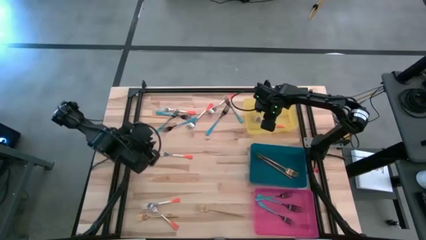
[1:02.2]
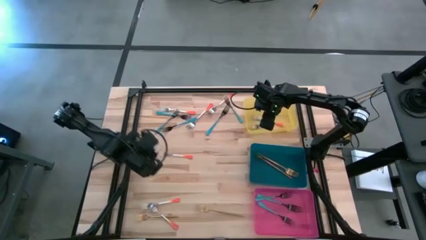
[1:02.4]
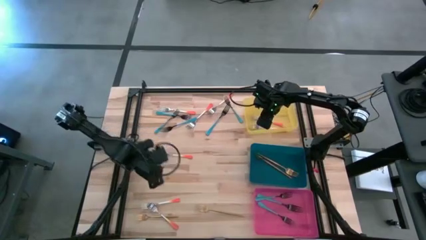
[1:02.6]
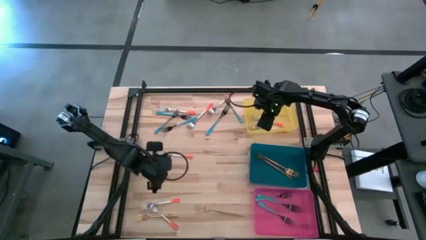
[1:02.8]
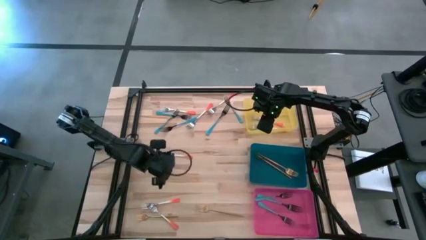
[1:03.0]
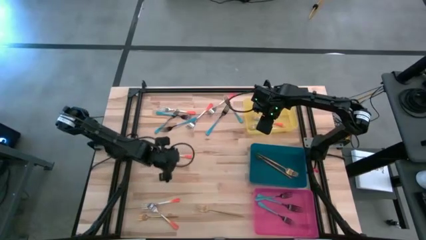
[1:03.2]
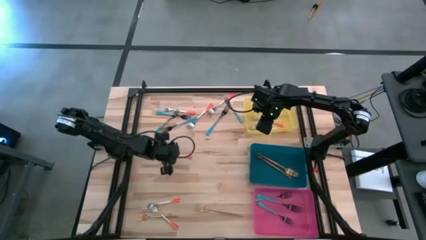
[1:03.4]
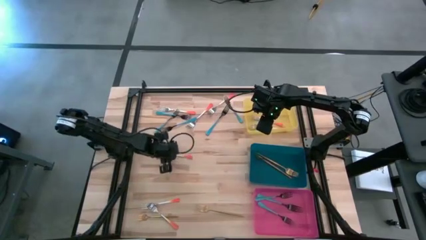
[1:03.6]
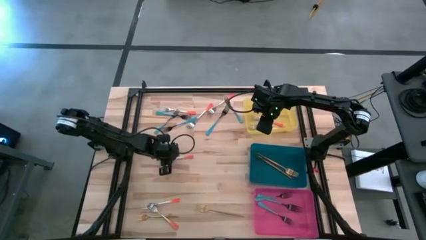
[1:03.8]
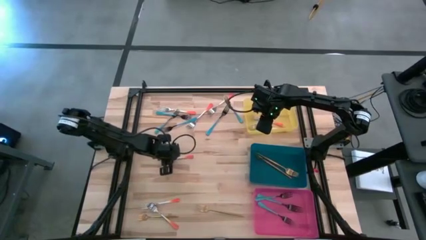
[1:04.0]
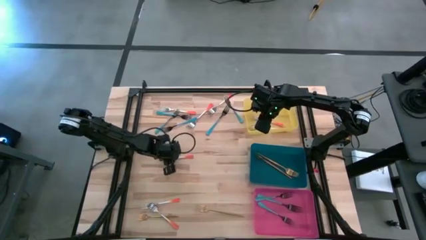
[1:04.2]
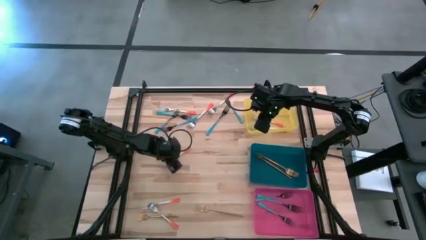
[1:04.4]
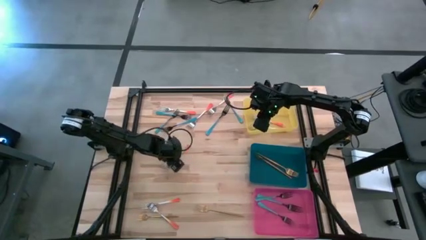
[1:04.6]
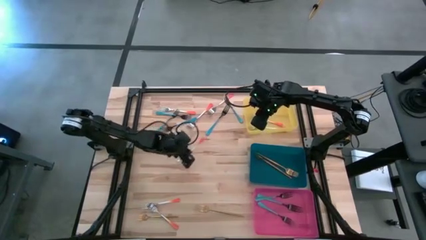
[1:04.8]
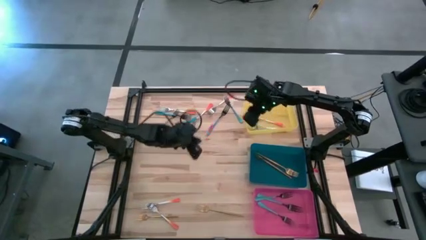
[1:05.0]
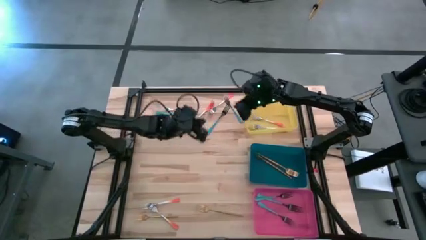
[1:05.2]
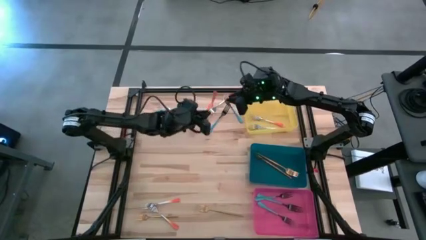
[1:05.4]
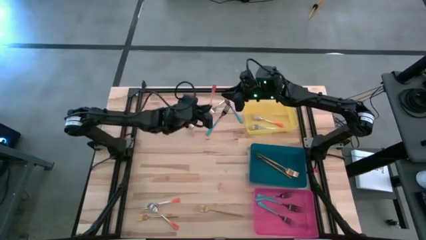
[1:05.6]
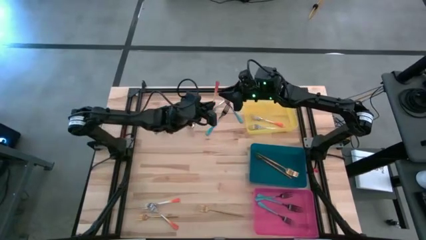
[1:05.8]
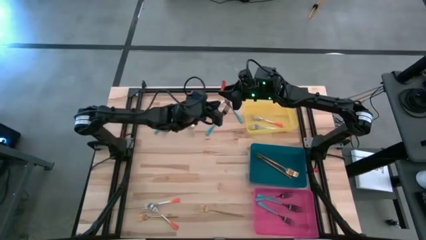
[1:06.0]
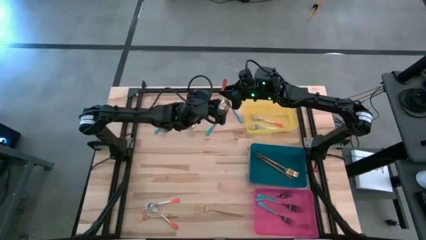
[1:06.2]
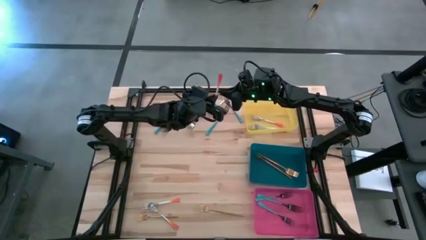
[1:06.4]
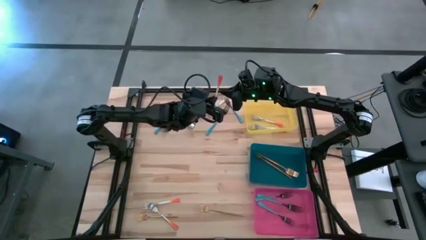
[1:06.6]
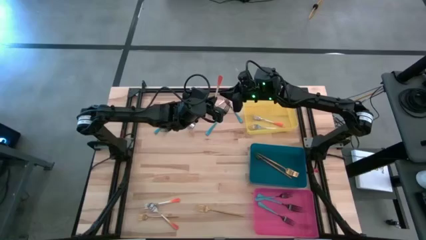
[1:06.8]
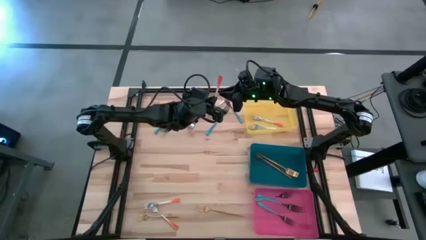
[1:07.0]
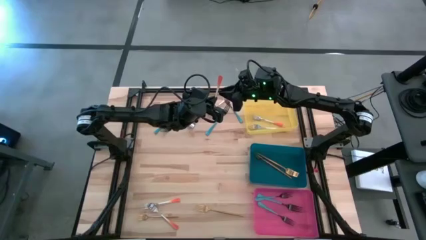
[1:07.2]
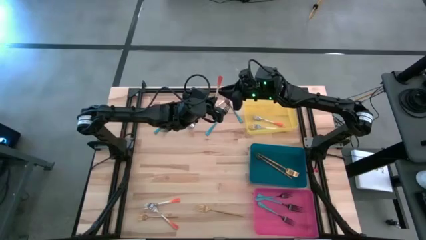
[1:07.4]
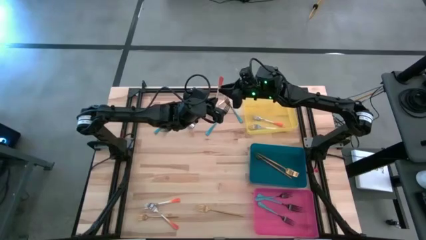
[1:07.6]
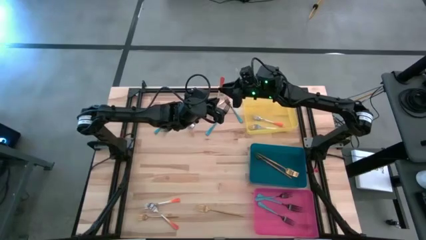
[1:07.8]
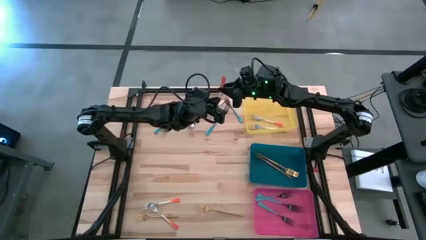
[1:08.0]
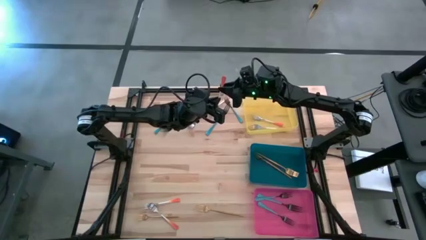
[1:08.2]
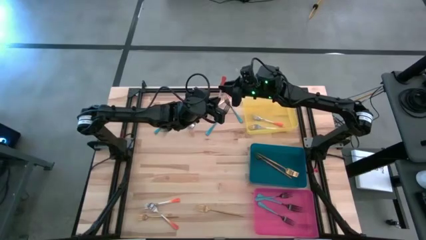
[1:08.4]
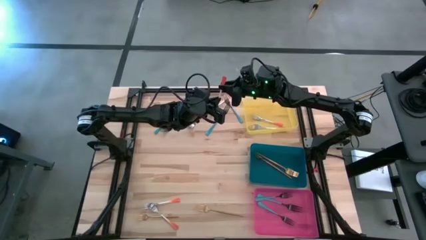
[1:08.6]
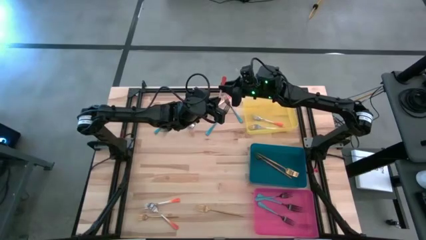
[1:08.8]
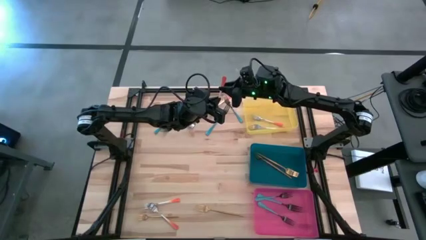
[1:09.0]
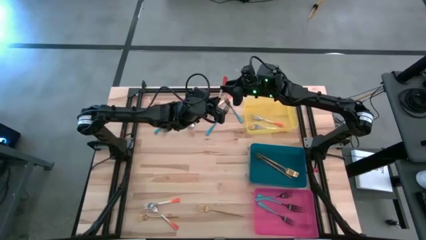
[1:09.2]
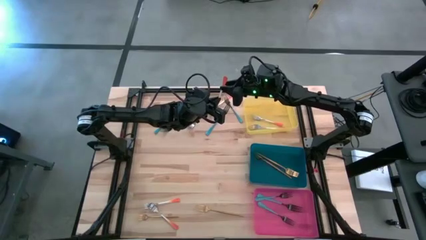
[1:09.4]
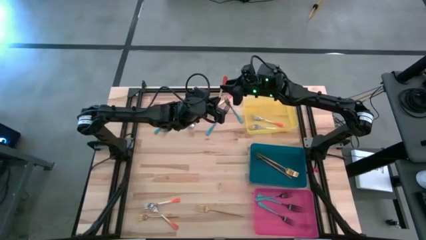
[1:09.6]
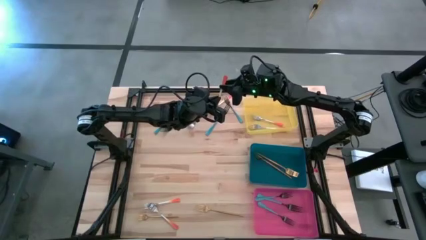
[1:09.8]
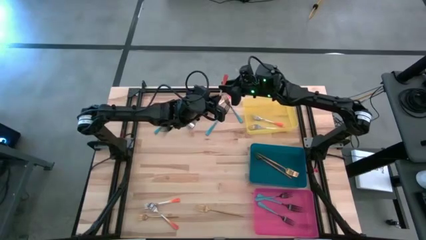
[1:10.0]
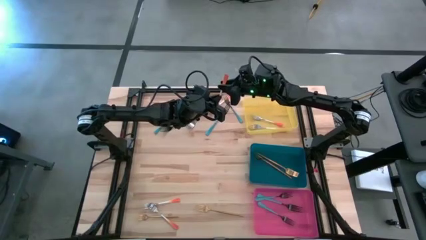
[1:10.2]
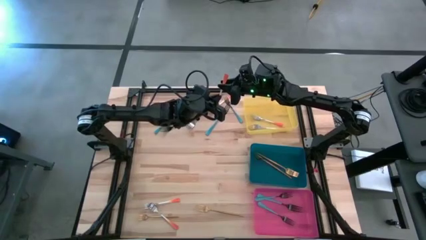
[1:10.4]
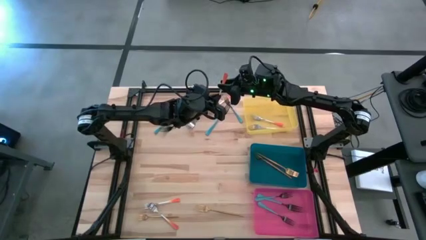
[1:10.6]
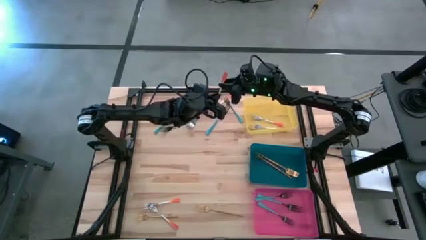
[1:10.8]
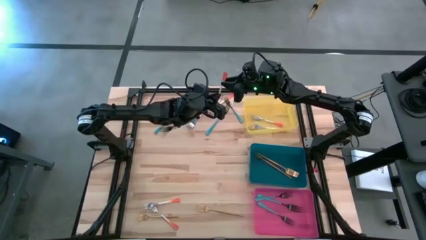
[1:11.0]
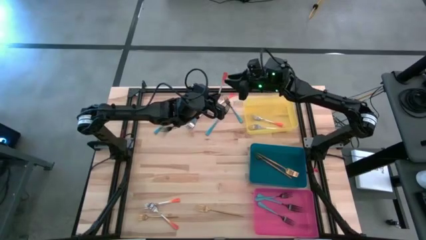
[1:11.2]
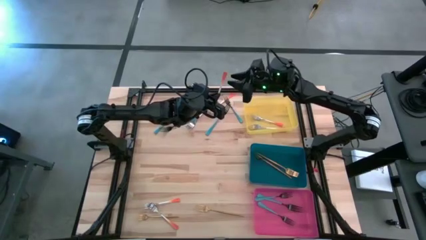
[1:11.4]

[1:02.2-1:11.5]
Task: Sort silverware by color (type)
Put the orange fork into the yellow bin

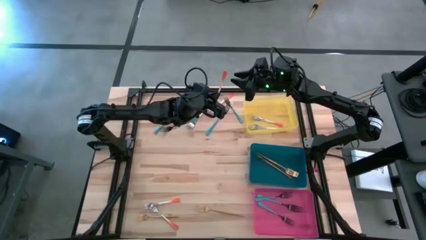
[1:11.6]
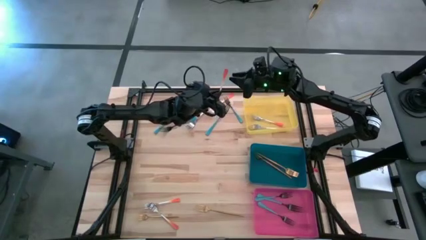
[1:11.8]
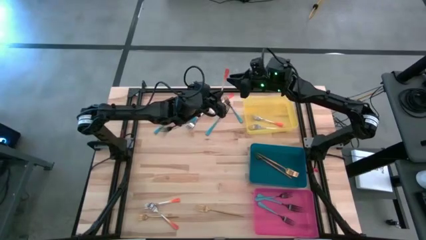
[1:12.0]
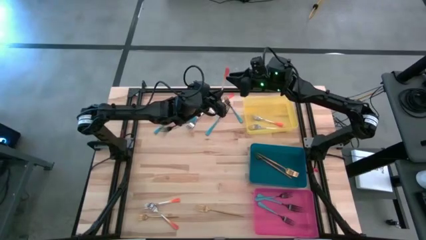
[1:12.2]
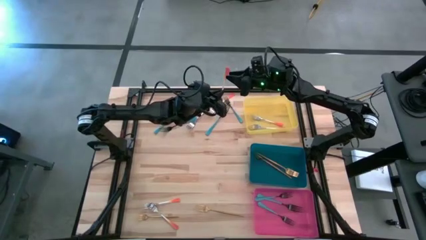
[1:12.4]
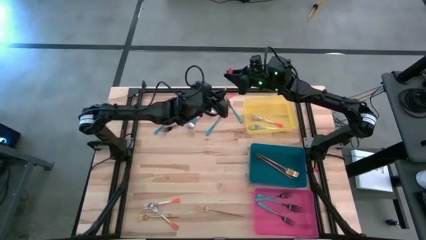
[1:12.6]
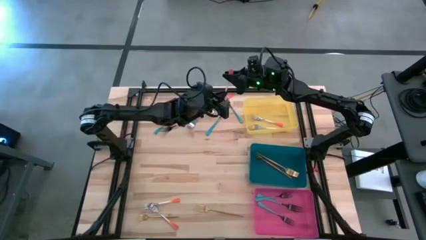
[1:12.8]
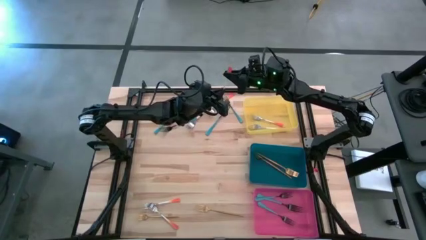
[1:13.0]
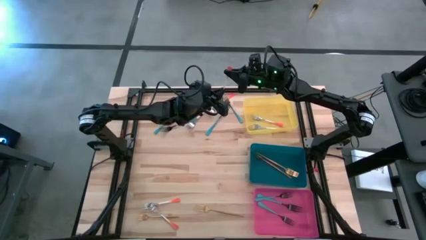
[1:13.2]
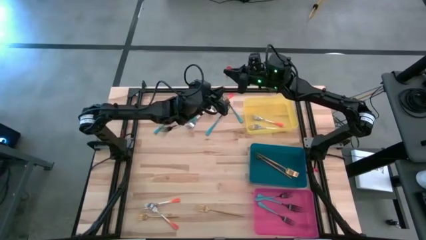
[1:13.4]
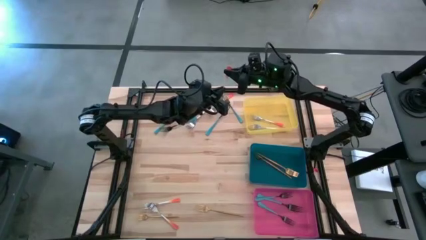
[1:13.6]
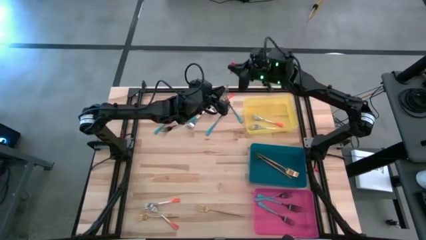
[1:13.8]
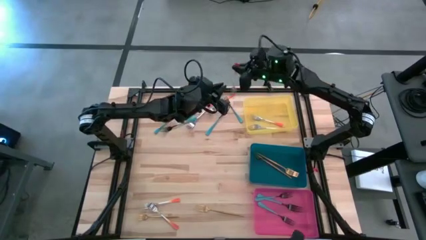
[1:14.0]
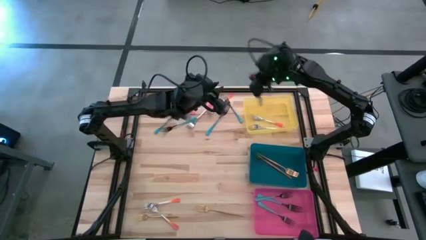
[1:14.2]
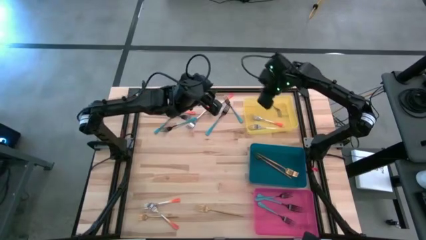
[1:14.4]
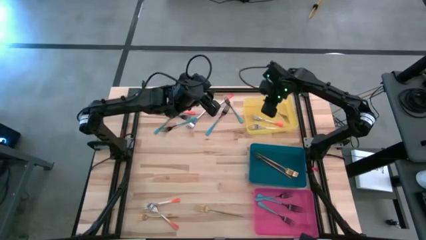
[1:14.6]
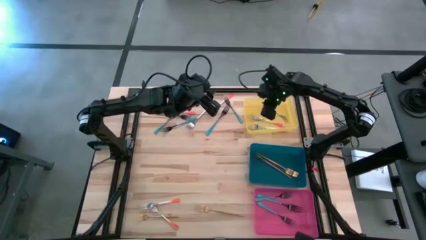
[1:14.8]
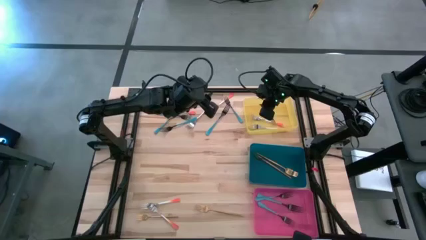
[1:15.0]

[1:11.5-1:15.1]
Put the orange fork into the yellow bin

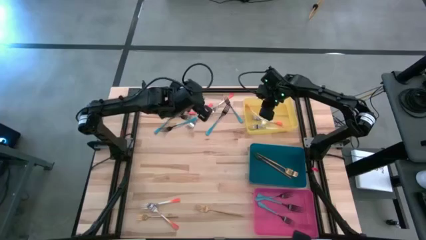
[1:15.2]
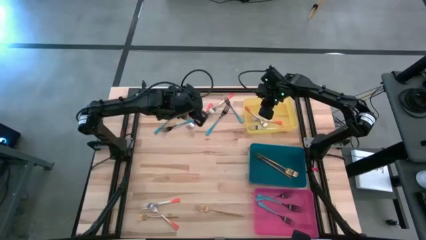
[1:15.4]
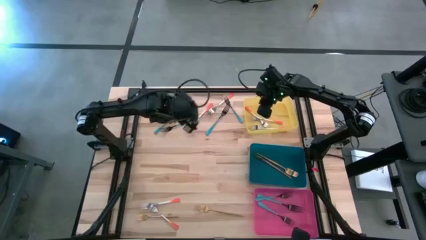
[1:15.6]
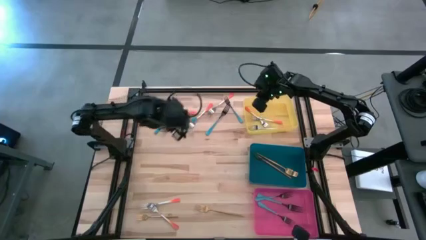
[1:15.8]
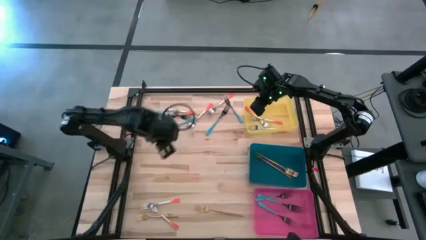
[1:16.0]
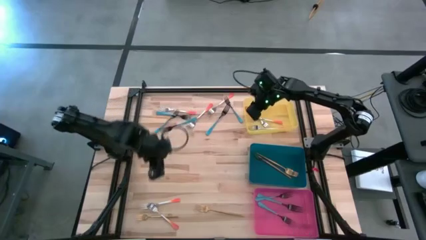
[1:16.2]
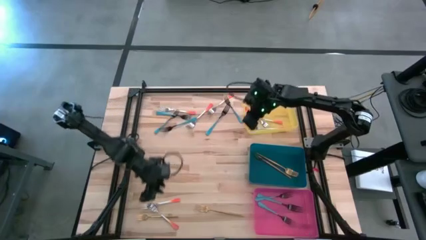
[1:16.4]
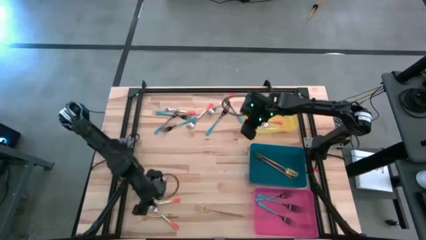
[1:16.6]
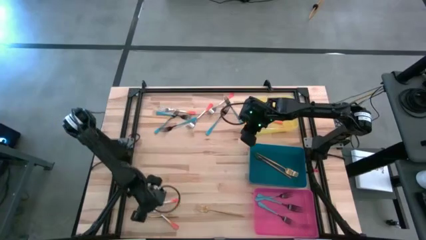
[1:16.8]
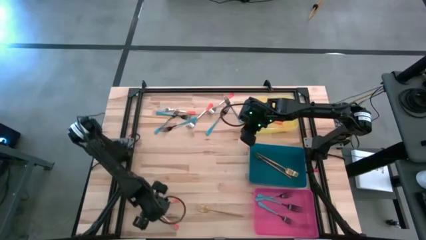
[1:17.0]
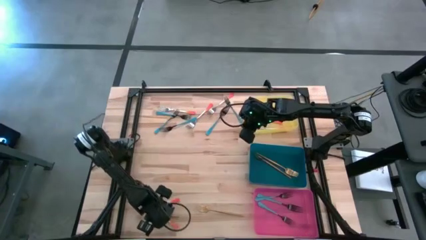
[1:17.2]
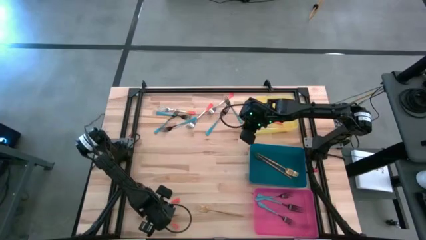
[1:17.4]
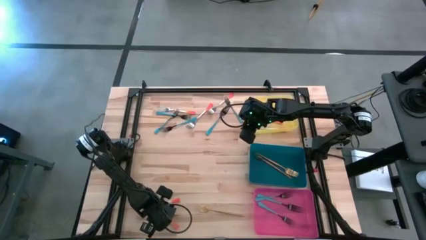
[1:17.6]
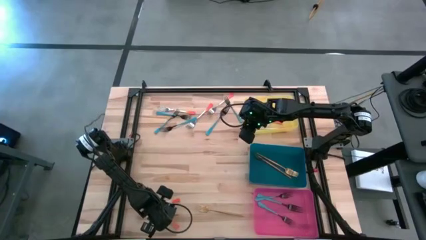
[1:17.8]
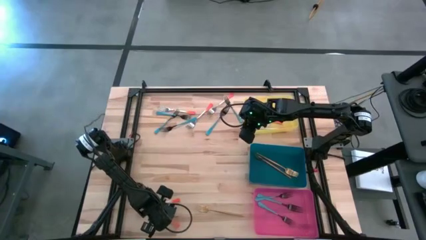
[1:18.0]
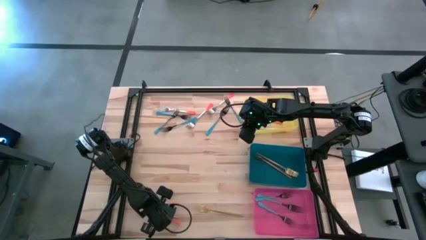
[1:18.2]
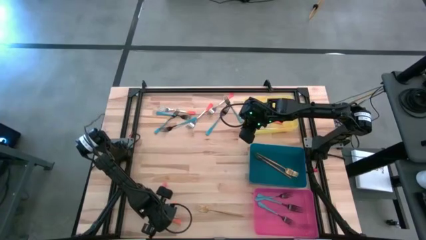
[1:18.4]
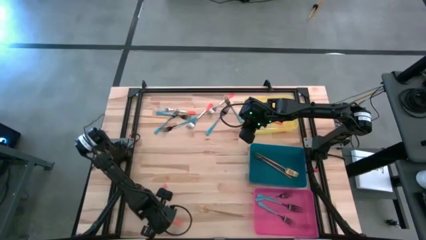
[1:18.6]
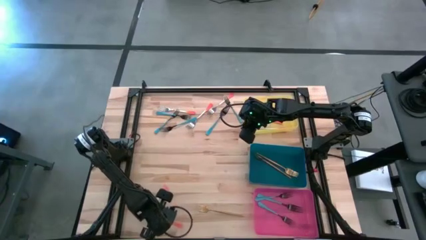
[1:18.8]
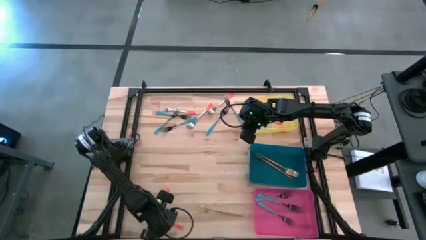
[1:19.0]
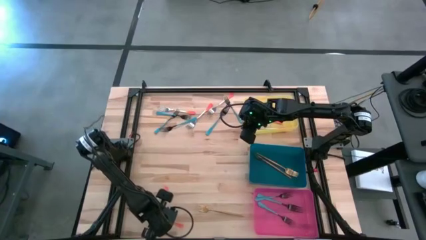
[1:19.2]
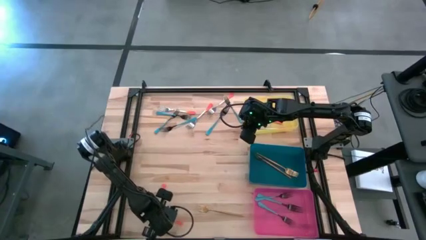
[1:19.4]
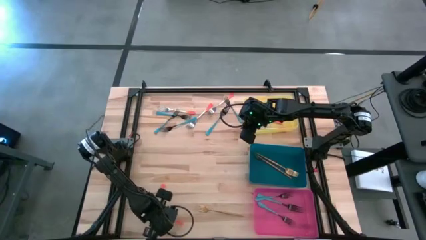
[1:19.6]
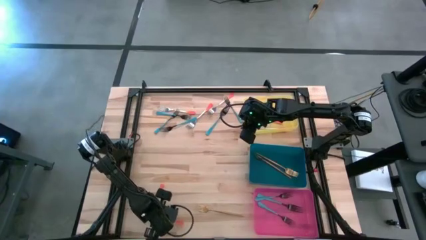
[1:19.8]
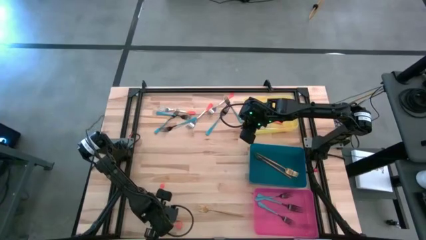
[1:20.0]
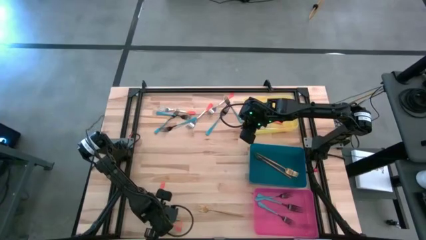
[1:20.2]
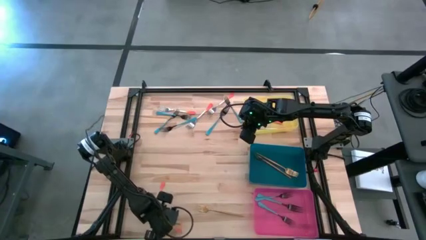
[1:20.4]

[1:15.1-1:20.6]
Put the orange fork into the yellow bin
